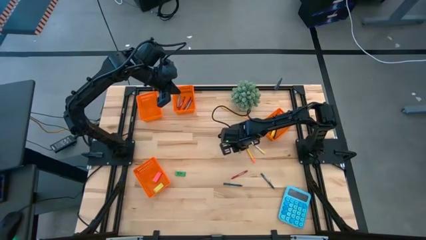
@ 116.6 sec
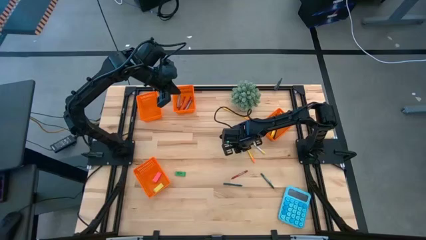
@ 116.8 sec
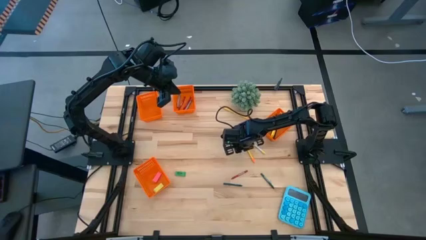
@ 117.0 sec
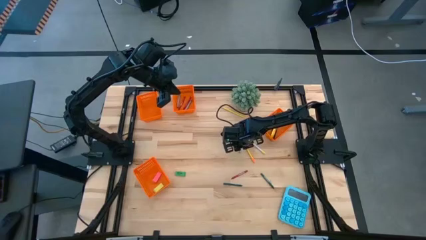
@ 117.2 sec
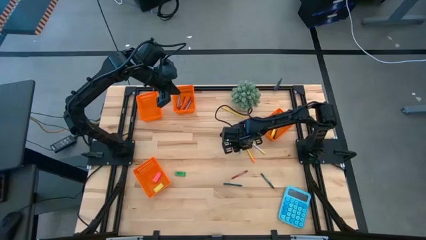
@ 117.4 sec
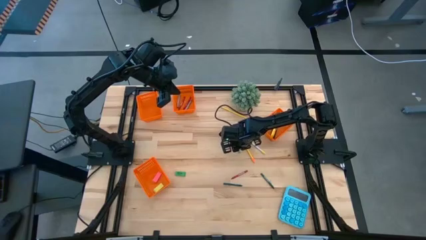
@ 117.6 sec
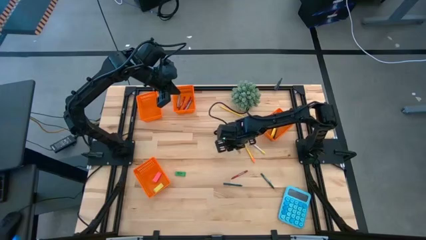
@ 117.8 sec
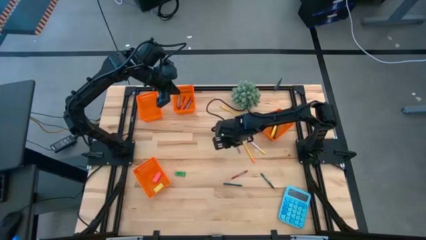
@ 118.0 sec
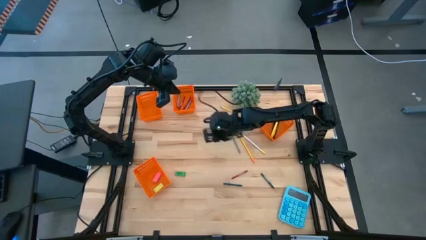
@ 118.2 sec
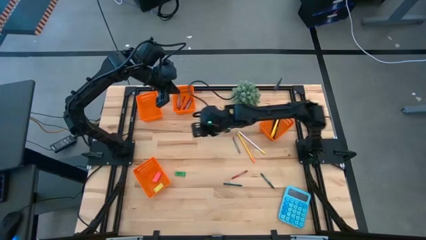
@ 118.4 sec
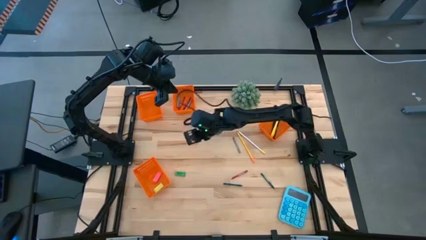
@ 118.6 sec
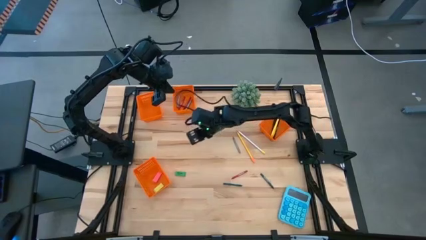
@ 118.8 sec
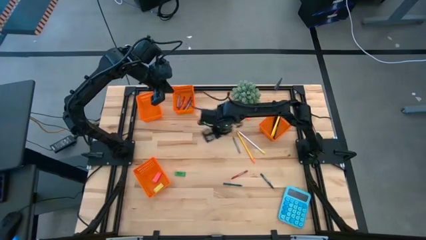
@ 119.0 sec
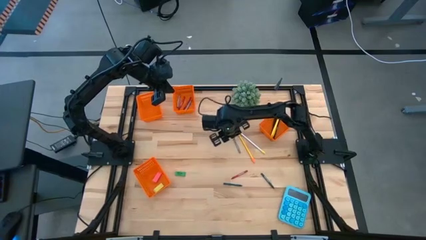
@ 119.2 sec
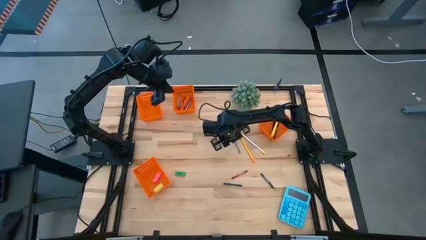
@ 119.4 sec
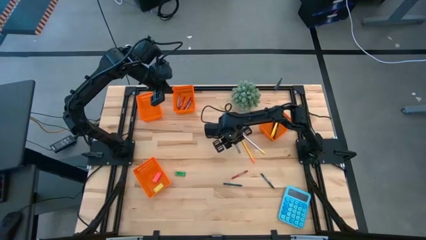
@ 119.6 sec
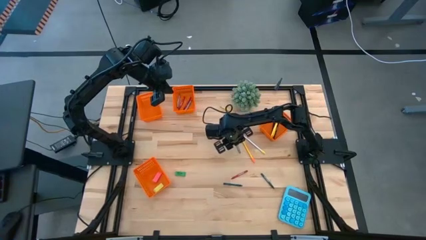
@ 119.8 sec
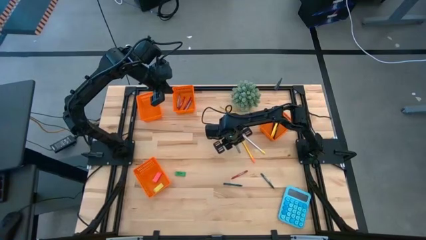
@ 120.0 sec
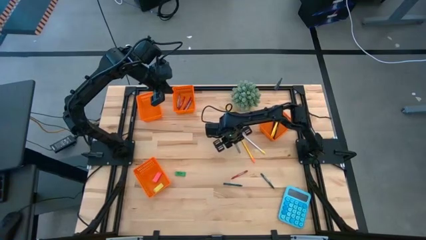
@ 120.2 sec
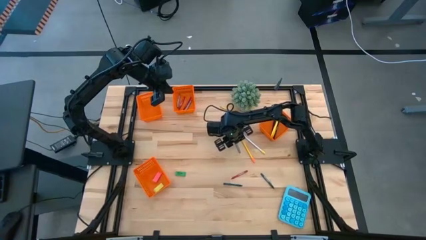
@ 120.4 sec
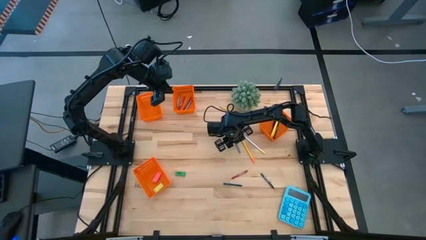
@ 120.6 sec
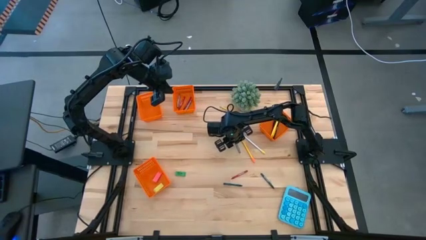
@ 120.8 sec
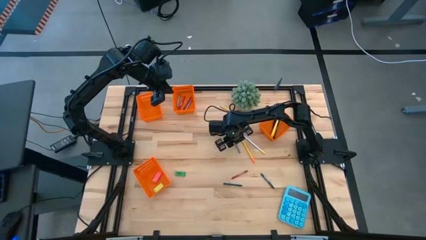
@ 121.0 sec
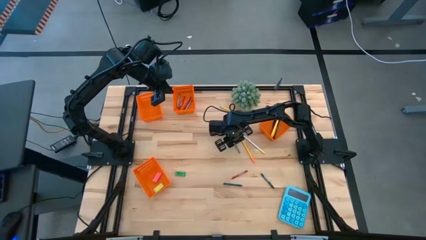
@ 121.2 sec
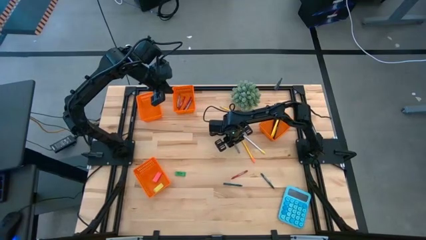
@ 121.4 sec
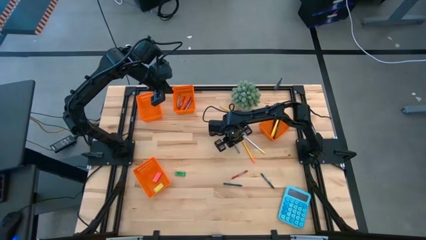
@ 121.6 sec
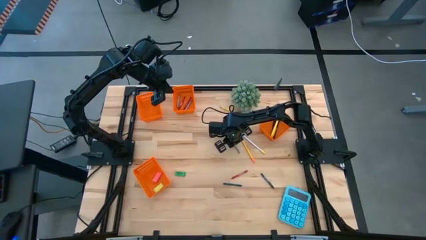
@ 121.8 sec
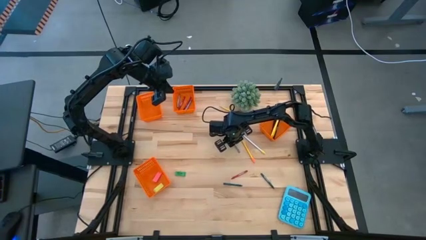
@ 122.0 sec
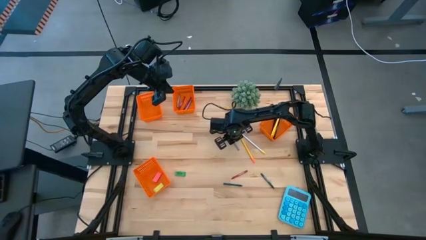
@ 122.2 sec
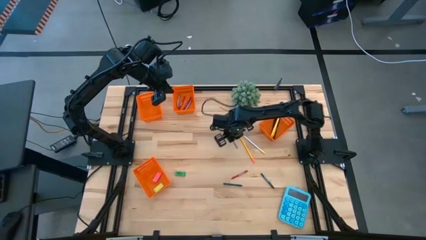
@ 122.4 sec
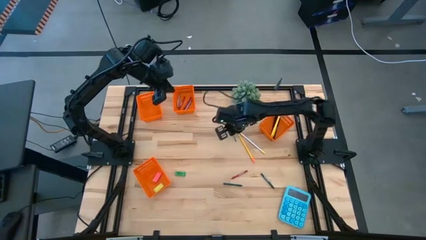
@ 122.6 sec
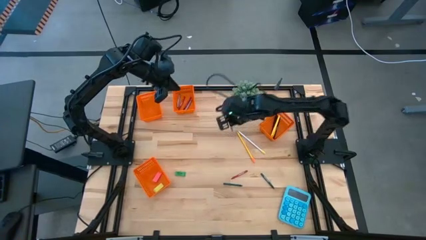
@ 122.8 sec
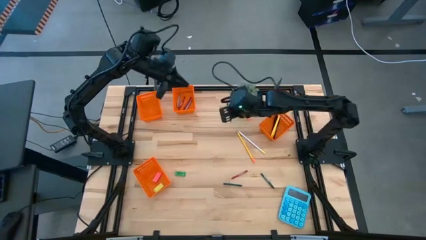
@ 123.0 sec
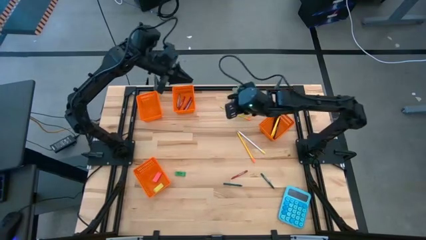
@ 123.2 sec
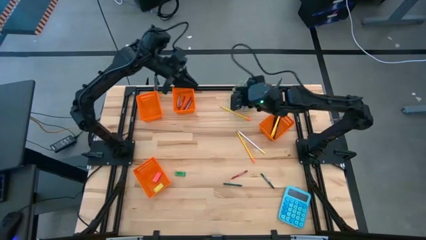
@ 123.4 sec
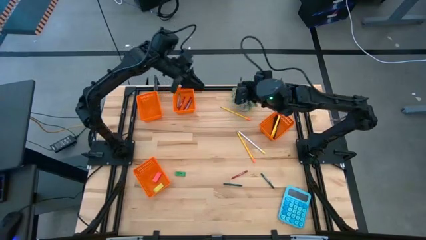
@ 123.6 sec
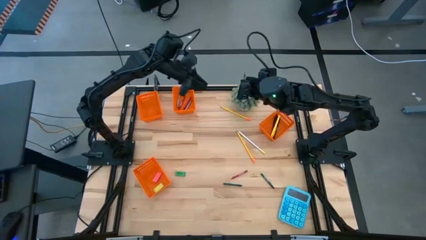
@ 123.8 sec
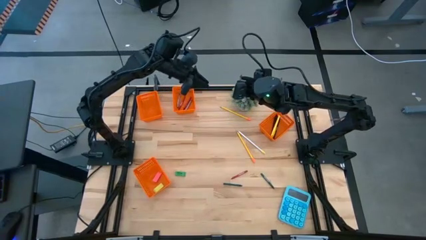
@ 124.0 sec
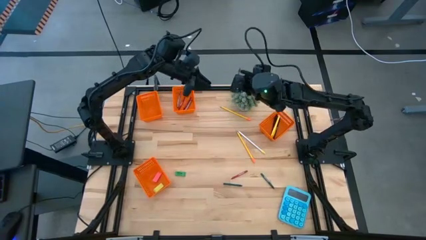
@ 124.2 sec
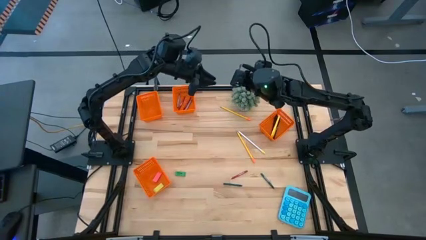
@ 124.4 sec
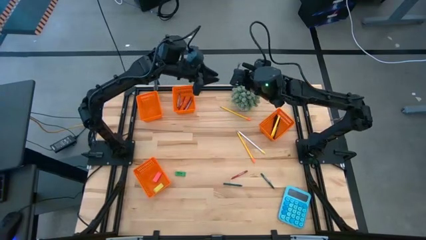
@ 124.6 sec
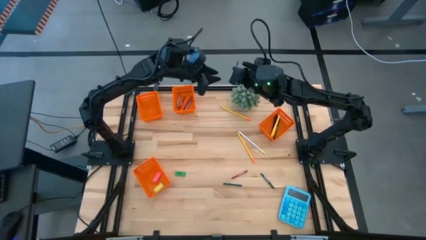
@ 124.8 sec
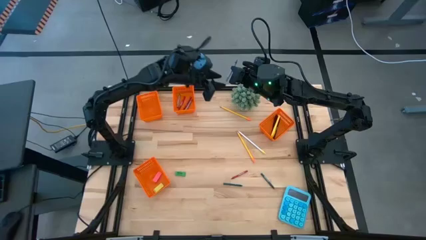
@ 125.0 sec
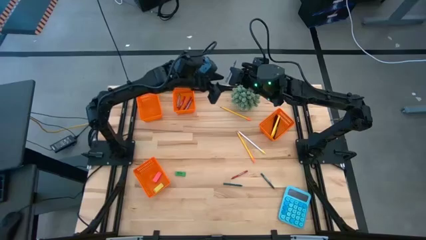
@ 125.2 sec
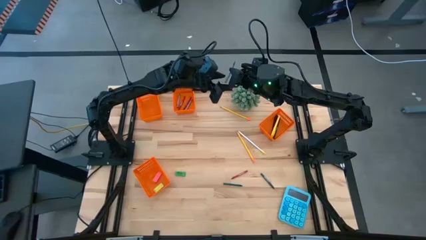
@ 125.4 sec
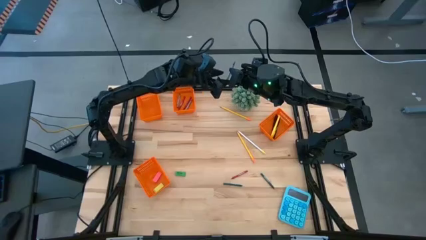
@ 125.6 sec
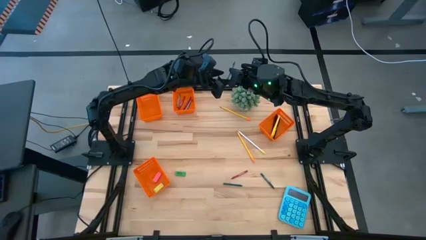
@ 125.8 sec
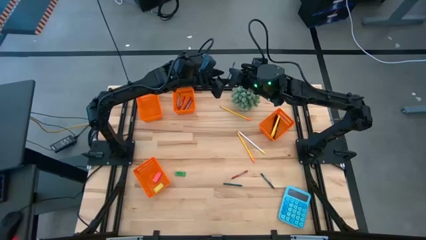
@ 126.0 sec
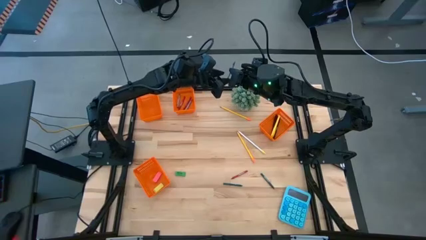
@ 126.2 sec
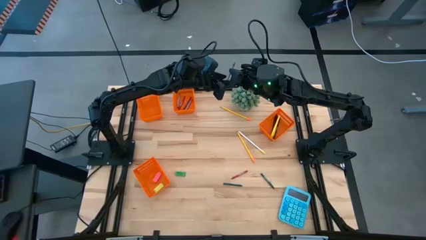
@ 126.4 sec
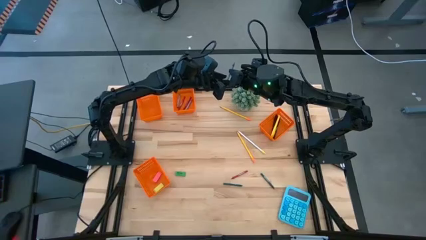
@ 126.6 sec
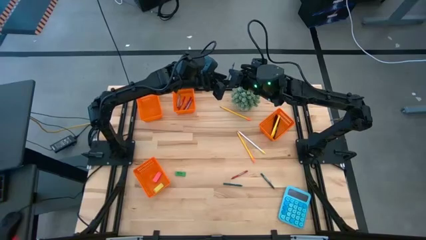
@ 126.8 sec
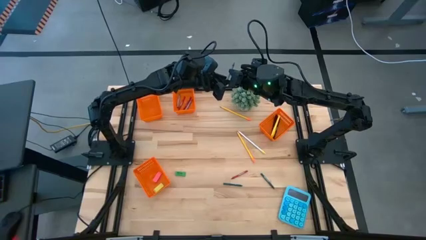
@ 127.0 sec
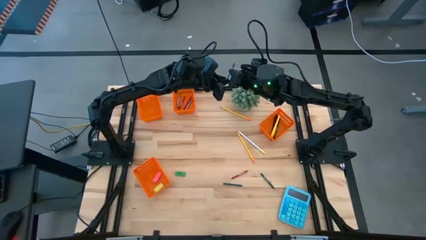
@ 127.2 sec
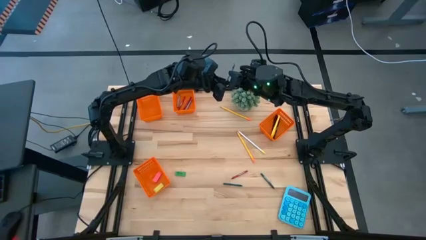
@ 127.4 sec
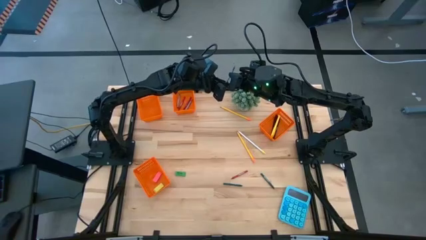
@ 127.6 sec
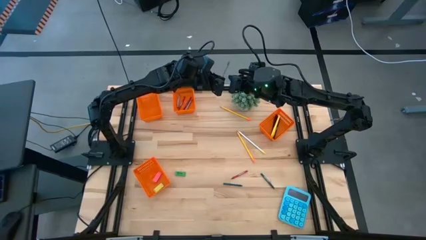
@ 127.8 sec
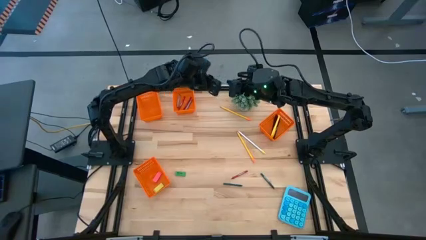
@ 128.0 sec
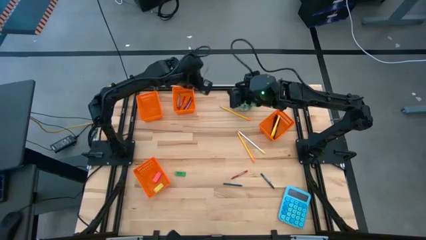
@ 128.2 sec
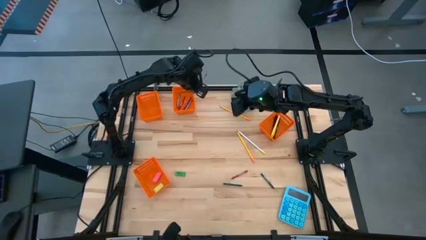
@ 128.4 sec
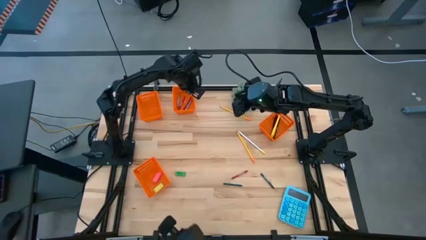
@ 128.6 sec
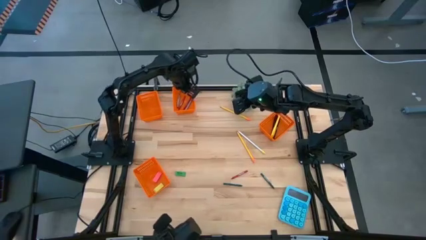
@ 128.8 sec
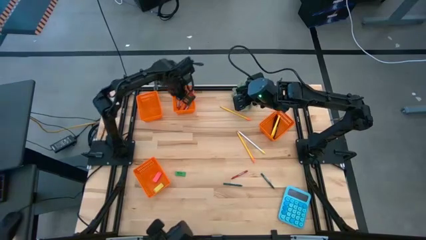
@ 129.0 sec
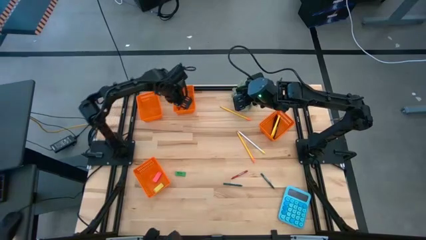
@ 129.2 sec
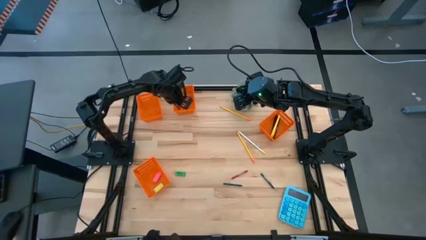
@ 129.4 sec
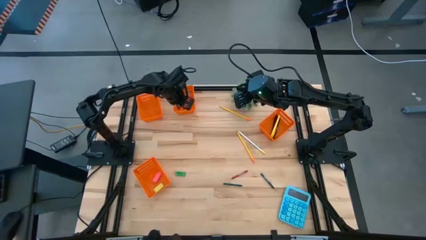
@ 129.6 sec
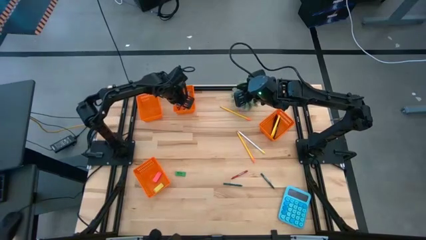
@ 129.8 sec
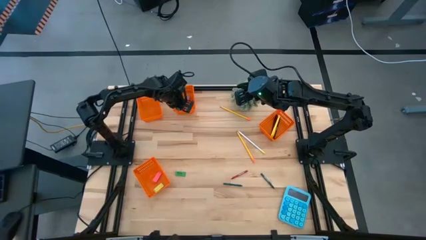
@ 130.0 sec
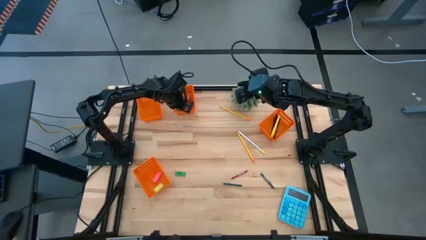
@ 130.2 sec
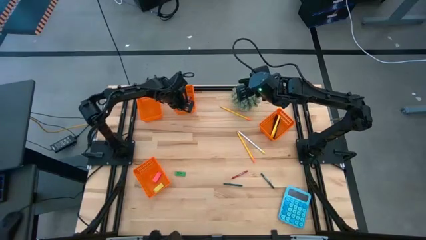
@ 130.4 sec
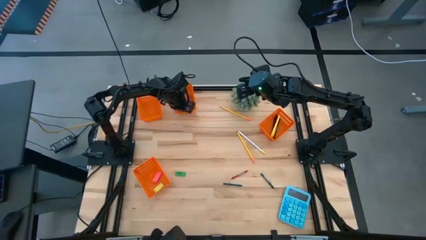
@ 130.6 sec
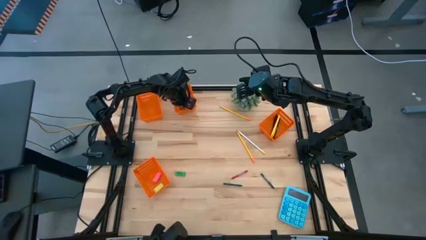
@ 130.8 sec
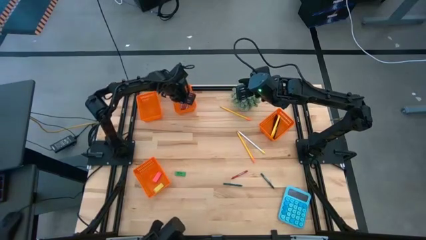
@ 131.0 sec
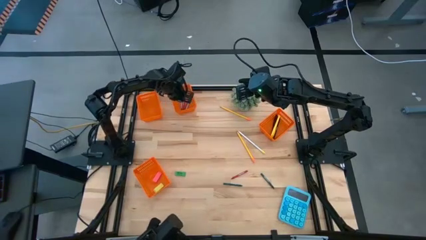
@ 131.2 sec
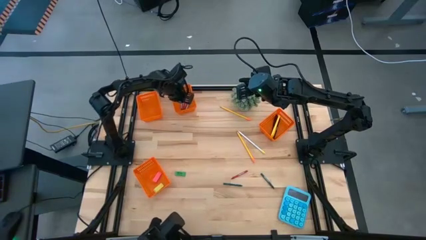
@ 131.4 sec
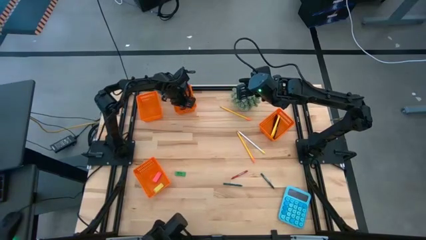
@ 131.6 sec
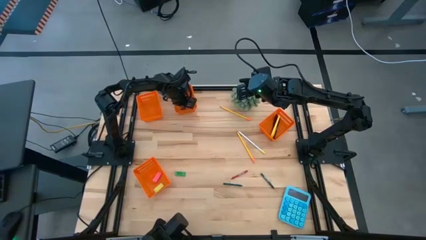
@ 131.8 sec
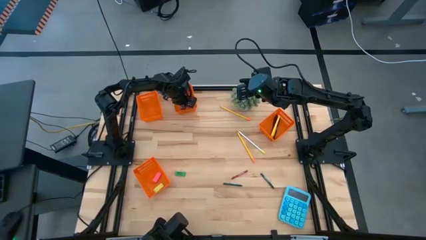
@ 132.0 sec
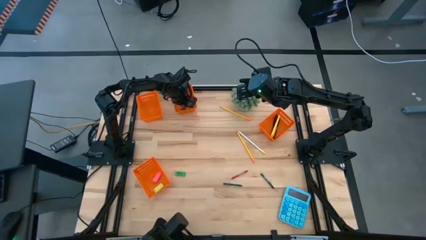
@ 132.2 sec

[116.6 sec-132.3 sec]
Task: Sort crayons/erasers/pens/pencils in bins
Put the gray crayon into the middle orange bin
